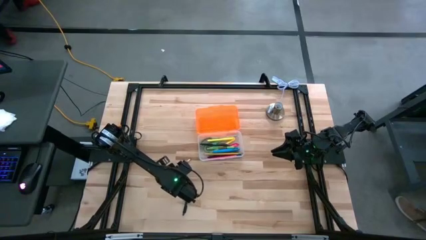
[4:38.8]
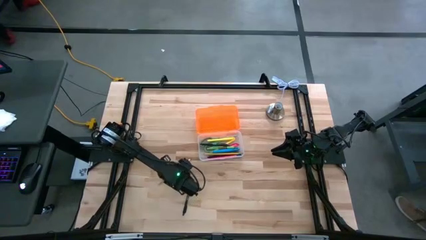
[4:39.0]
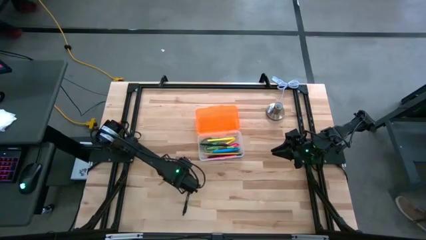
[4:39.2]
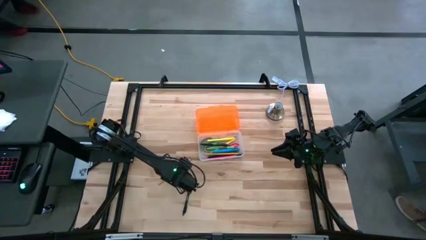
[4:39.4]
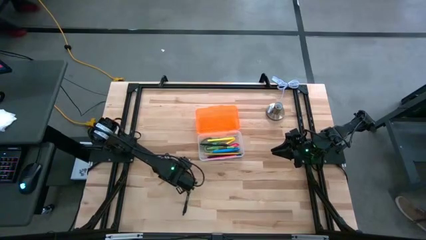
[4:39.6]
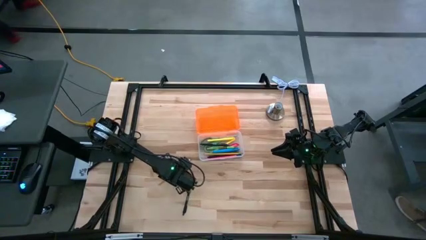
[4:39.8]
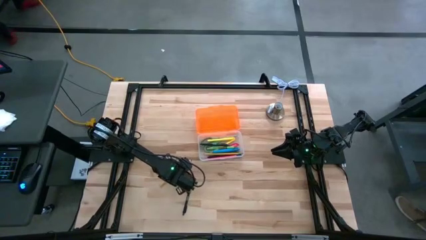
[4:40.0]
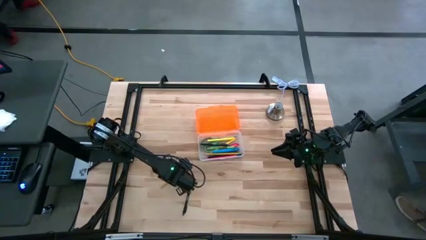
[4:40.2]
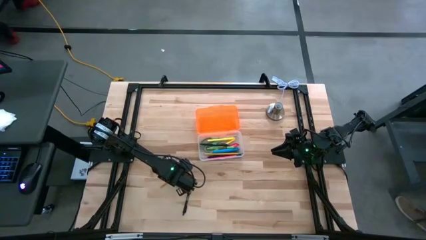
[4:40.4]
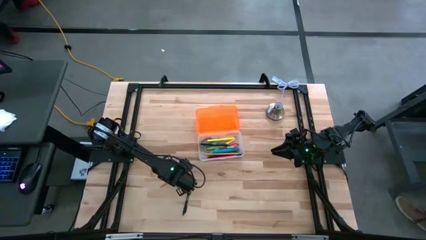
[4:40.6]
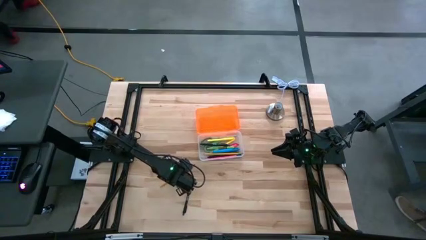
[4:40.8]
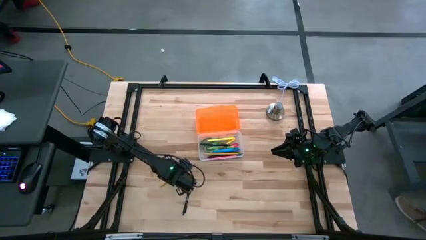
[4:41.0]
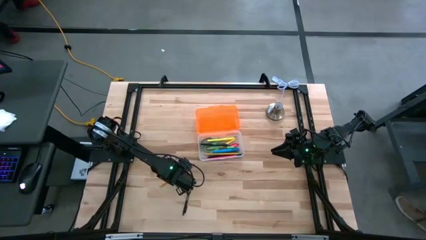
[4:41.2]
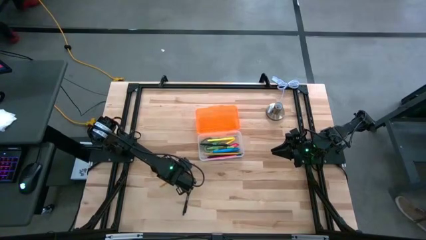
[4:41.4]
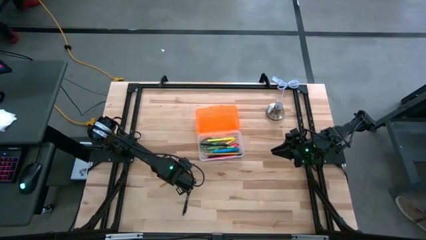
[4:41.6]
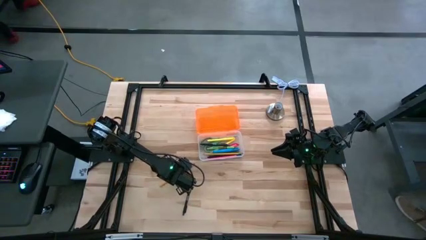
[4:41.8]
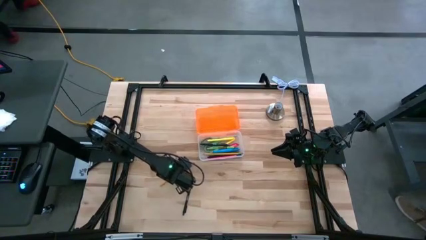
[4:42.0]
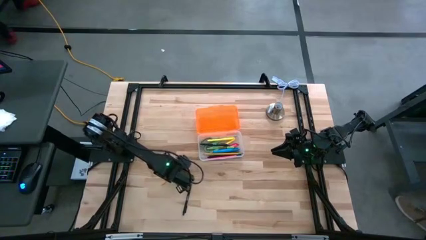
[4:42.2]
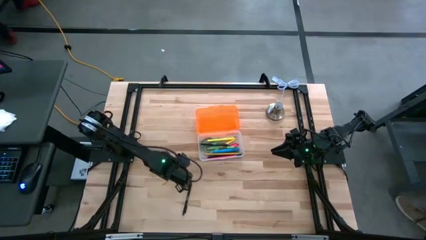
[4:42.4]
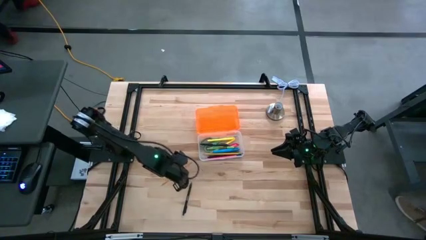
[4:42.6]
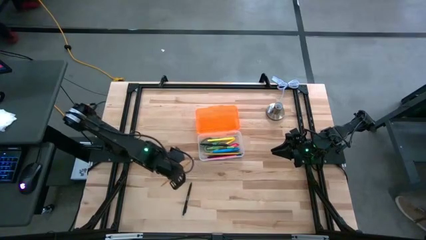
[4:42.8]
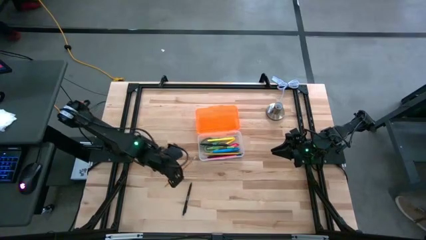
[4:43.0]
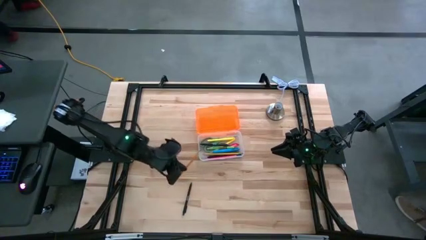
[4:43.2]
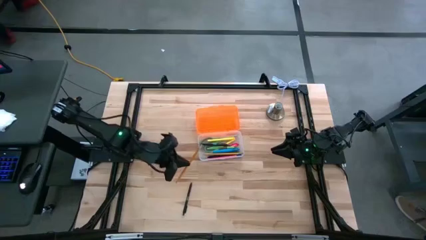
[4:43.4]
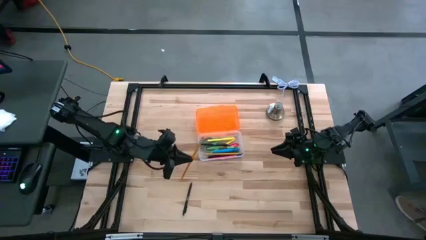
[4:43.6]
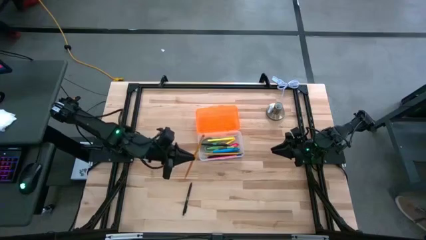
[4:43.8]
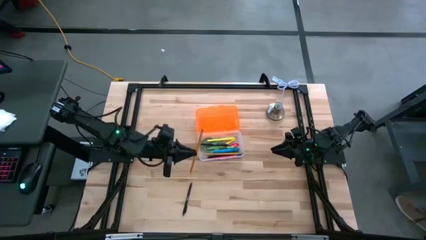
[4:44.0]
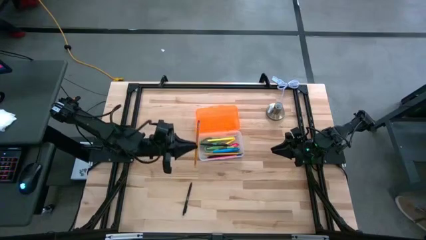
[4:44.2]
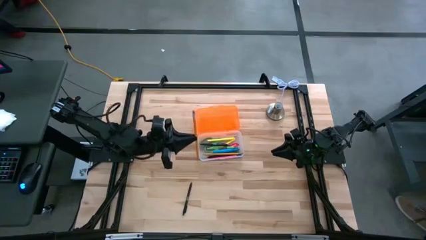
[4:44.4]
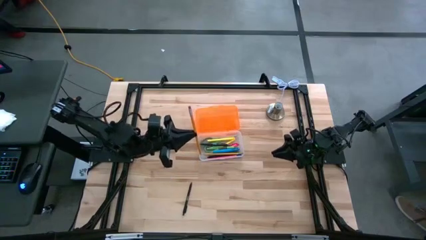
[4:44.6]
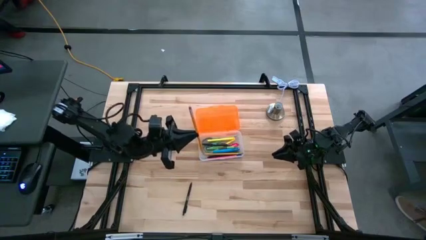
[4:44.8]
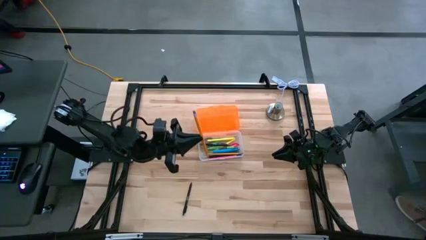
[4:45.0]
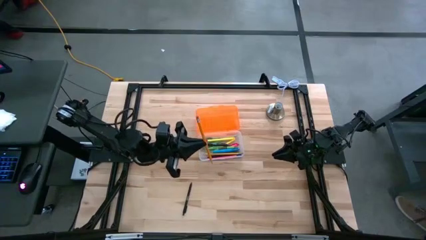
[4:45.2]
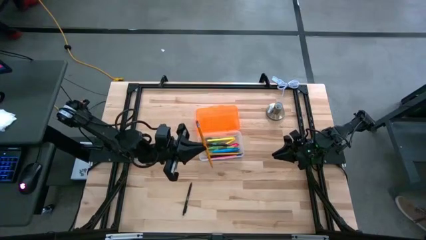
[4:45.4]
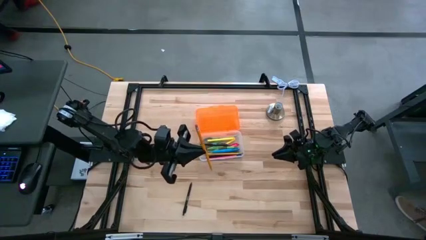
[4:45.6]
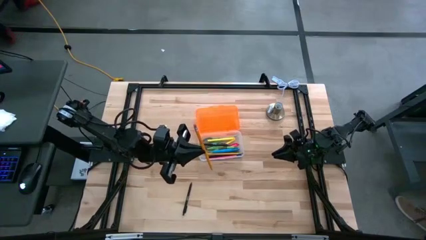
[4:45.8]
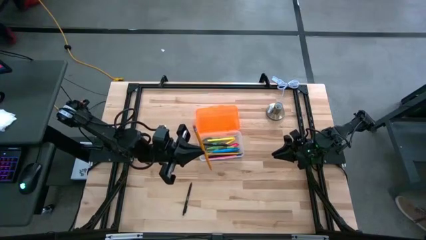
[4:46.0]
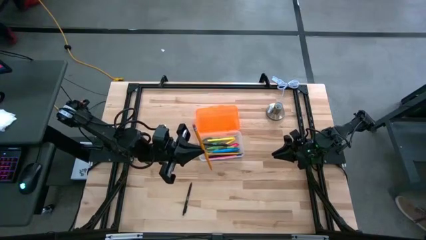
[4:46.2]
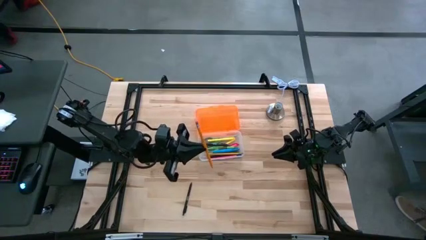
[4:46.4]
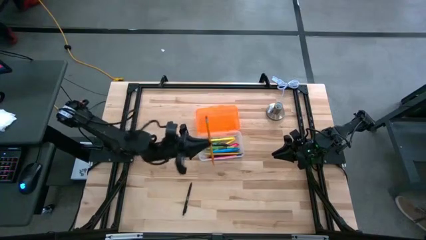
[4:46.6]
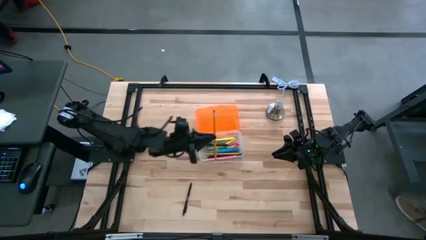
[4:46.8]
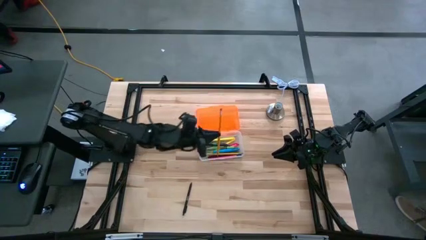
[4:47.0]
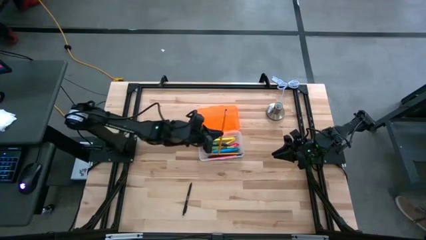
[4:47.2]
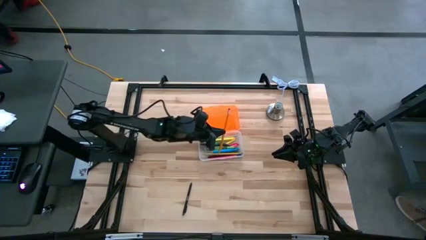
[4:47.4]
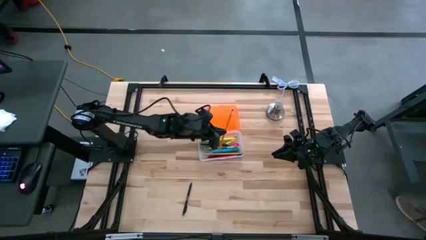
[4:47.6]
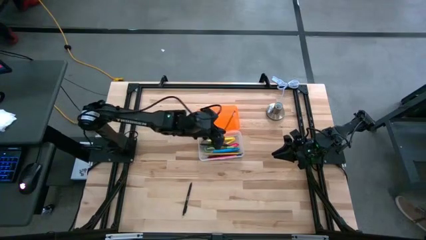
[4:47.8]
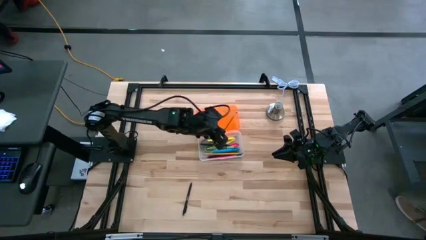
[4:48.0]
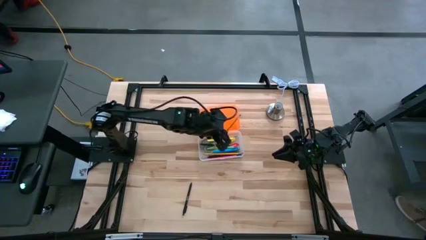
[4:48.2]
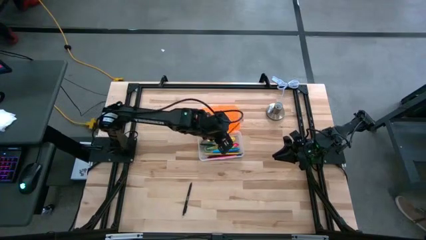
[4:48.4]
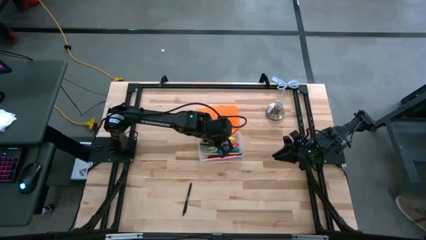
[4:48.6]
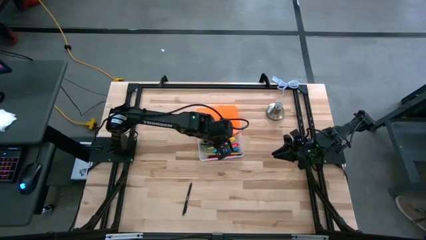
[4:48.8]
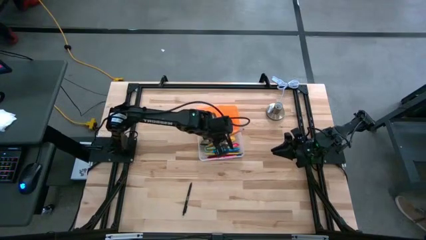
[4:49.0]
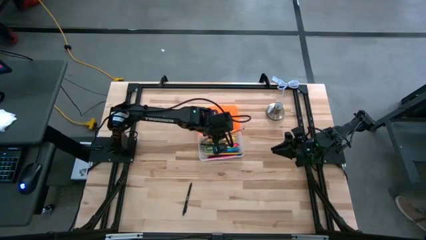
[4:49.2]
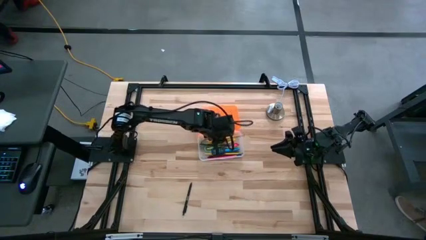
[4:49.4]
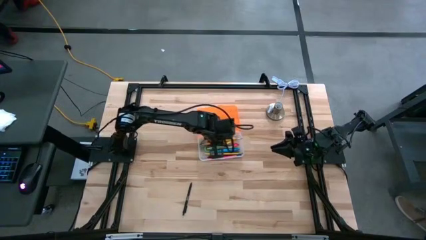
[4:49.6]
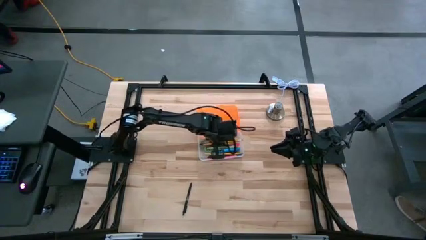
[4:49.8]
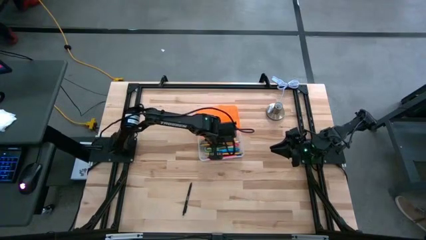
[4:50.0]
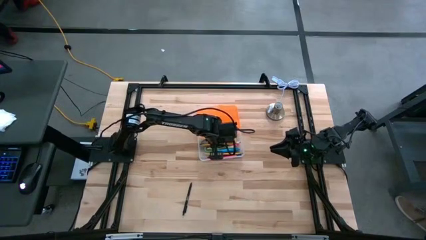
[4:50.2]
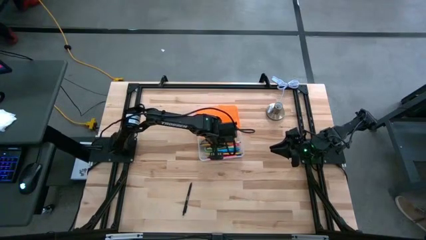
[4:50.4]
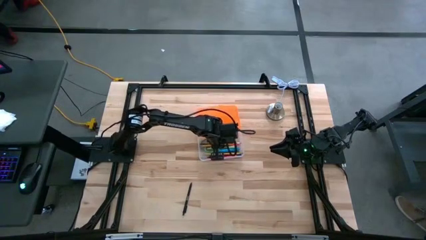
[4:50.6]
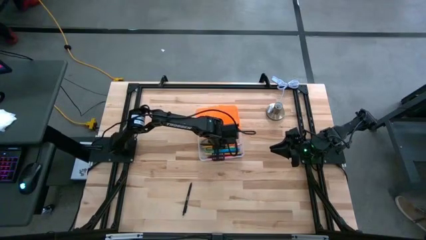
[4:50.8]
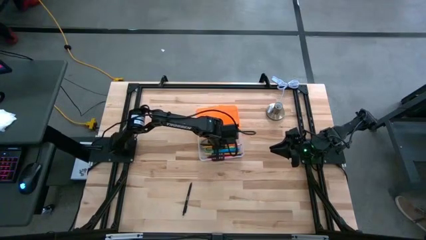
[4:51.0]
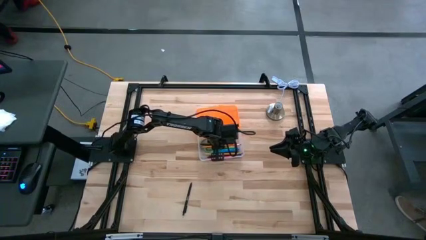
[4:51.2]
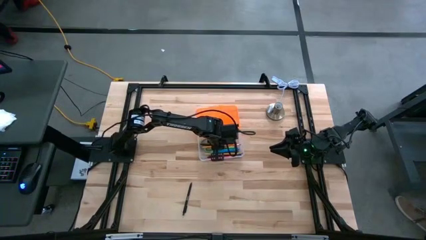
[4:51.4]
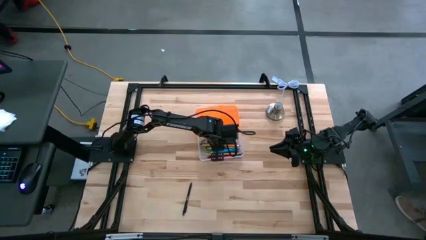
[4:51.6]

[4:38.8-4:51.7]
Task: Pick & place school supplies into a supply box
Put the yellow pen into the container

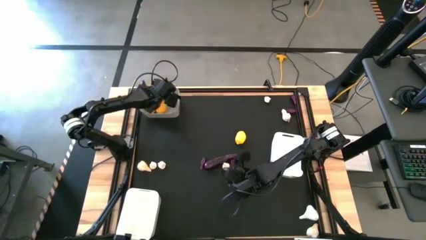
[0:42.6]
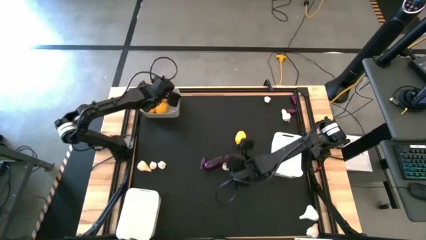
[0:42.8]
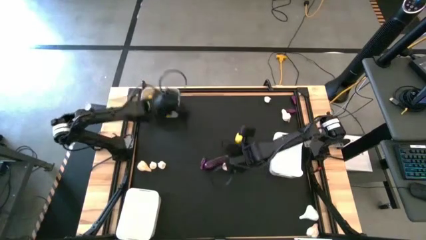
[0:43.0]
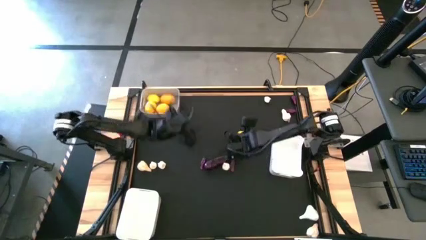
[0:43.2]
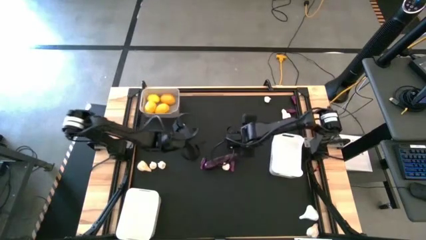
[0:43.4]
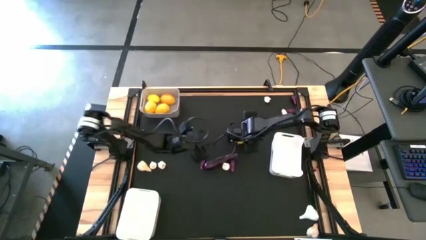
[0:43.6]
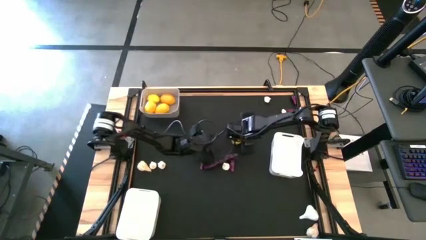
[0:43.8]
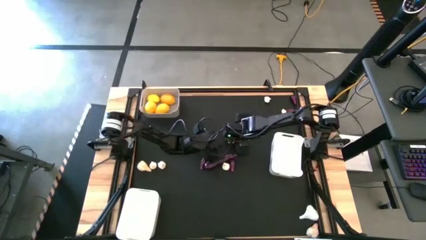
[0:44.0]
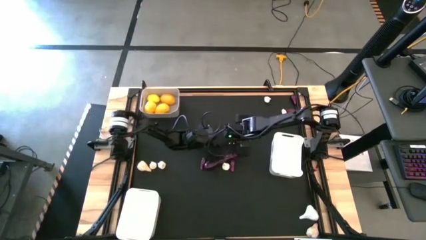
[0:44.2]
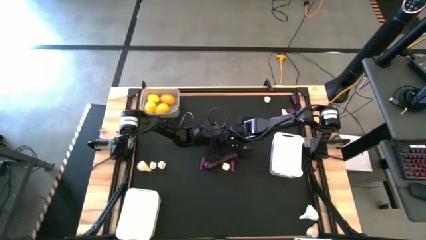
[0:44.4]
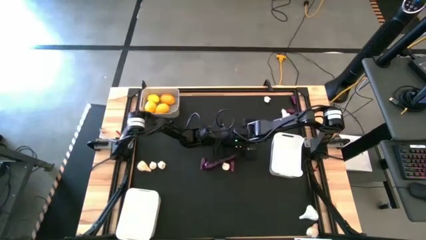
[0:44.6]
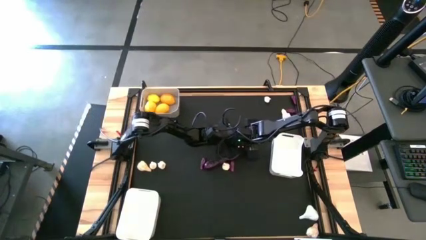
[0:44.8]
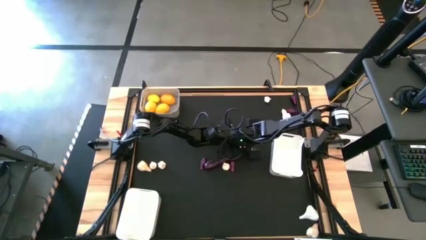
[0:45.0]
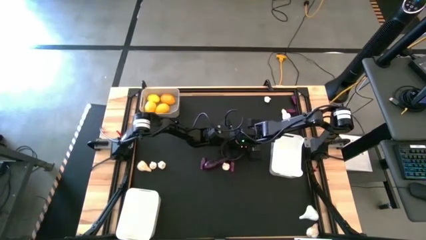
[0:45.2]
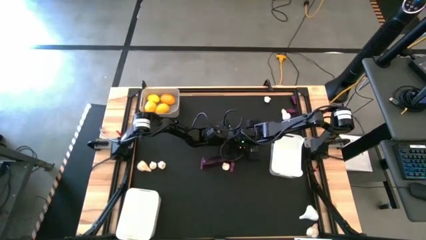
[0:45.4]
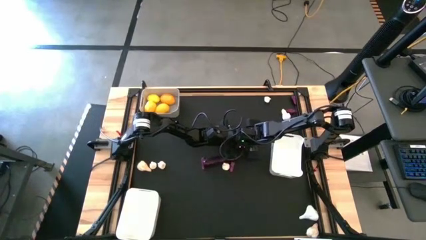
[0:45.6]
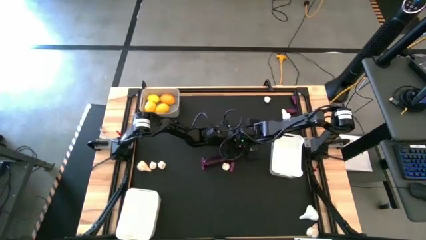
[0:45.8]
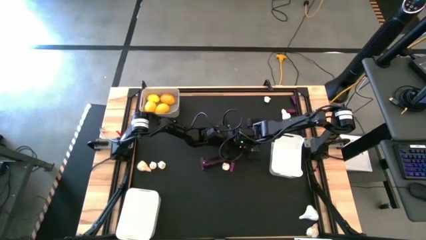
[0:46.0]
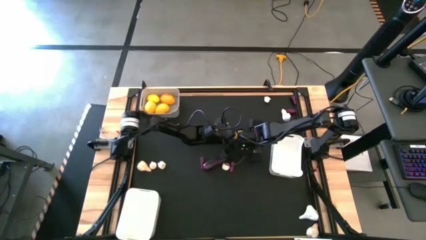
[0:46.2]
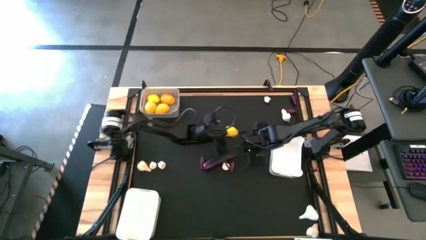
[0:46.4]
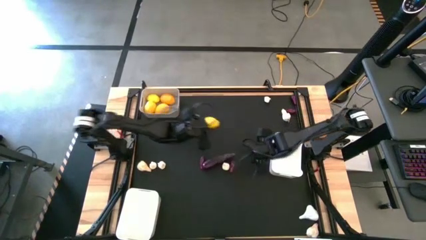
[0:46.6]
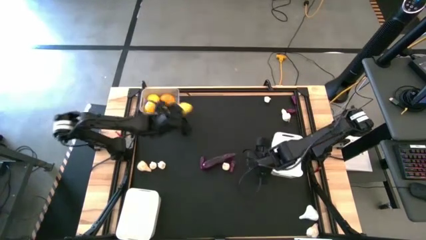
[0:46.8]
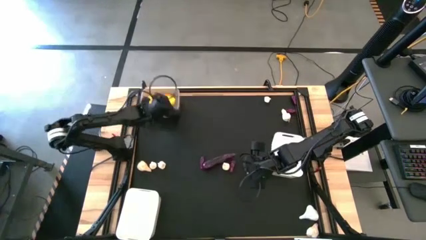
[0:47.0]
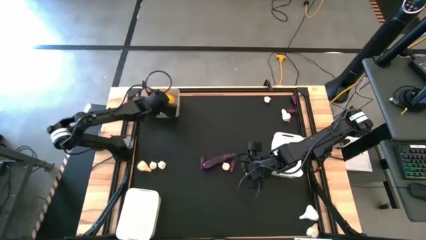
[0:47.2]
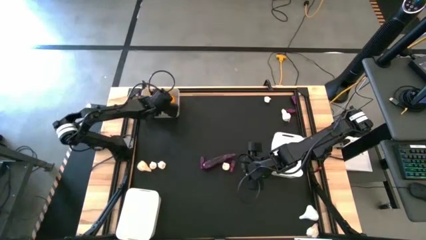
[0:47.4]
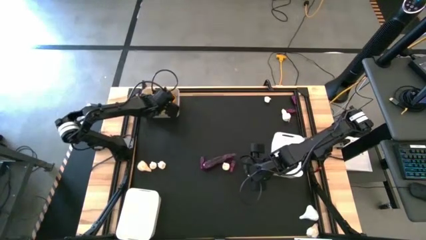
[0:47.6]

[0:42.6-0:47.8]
Task: Sort produce into baskets
Put the lemon into the top white bin
